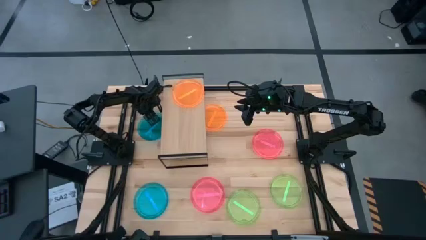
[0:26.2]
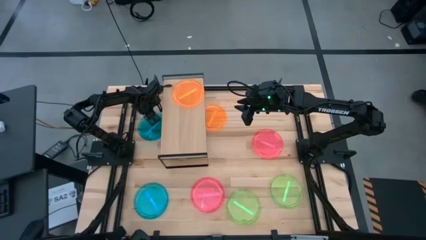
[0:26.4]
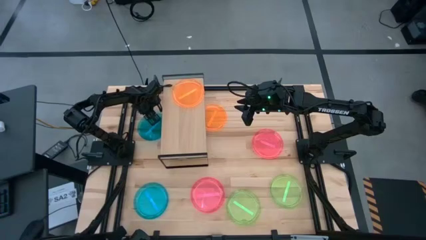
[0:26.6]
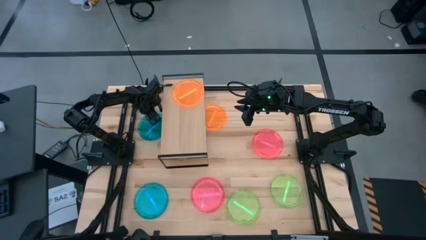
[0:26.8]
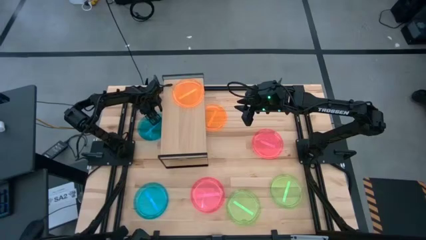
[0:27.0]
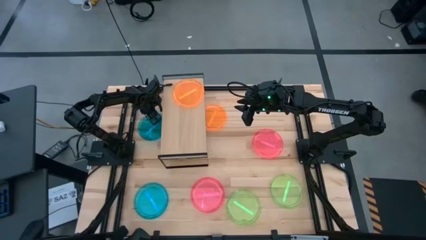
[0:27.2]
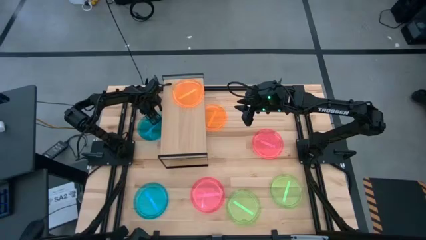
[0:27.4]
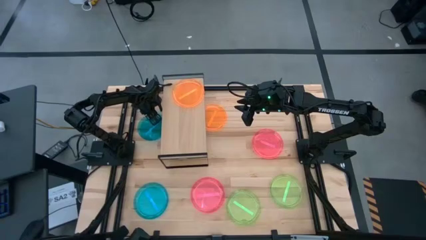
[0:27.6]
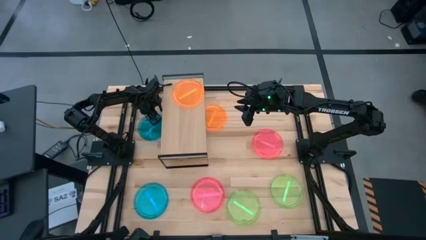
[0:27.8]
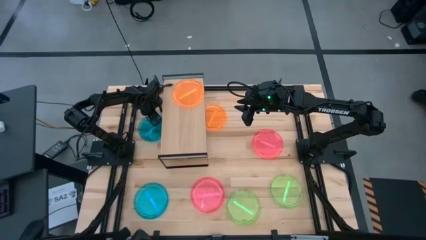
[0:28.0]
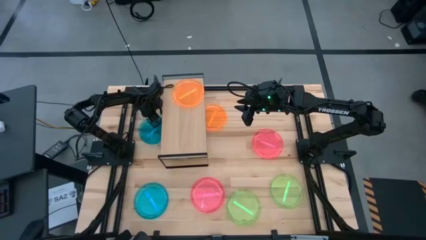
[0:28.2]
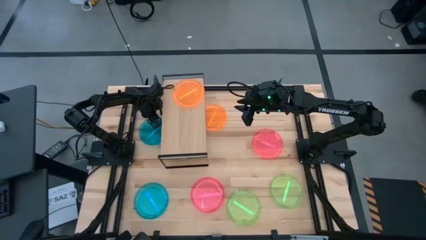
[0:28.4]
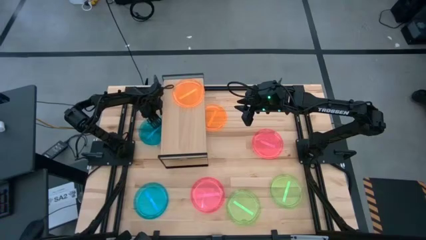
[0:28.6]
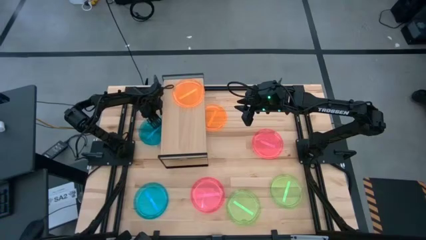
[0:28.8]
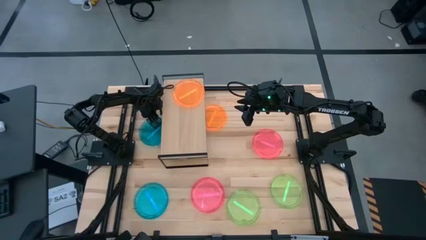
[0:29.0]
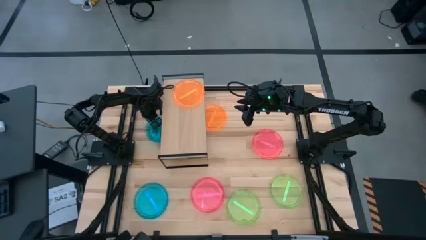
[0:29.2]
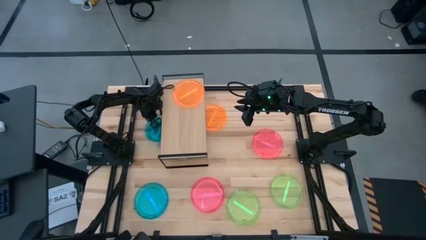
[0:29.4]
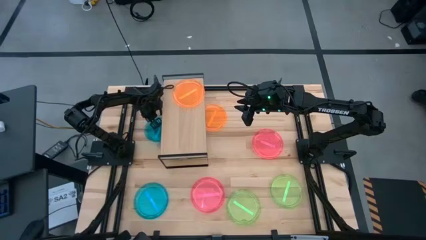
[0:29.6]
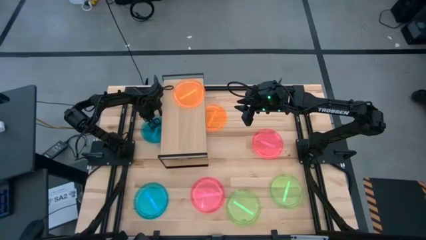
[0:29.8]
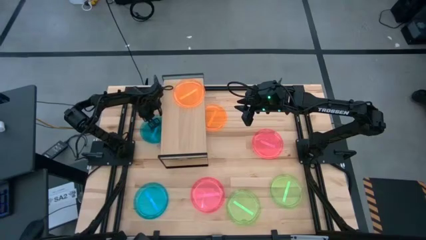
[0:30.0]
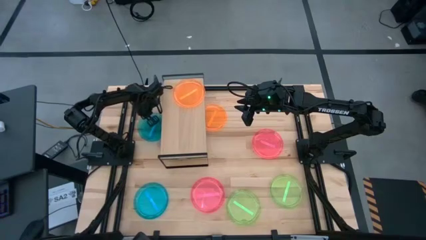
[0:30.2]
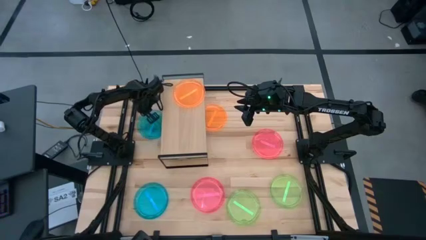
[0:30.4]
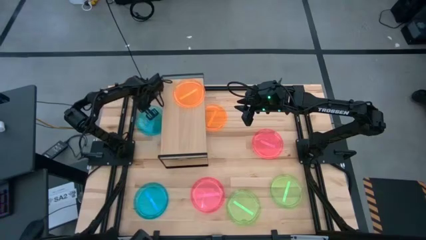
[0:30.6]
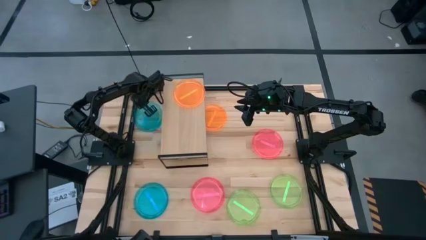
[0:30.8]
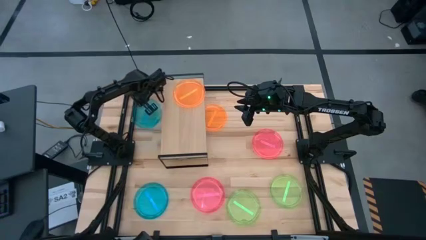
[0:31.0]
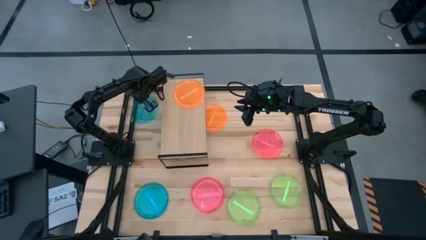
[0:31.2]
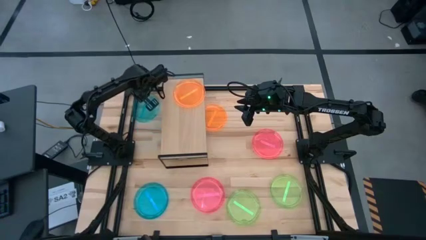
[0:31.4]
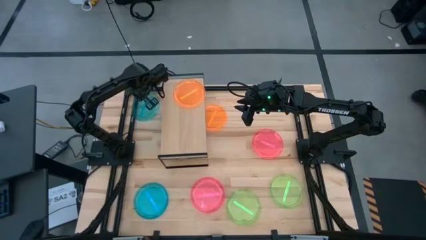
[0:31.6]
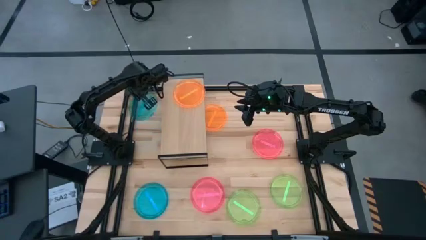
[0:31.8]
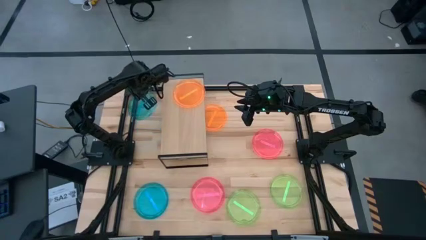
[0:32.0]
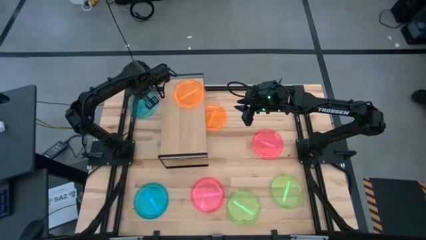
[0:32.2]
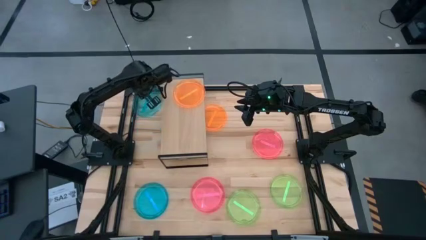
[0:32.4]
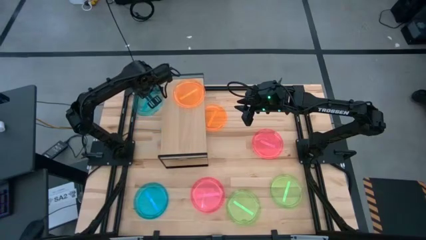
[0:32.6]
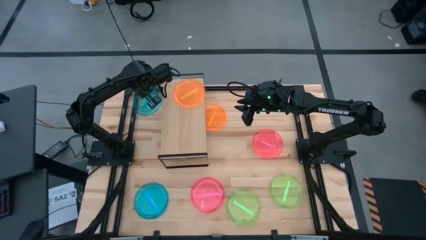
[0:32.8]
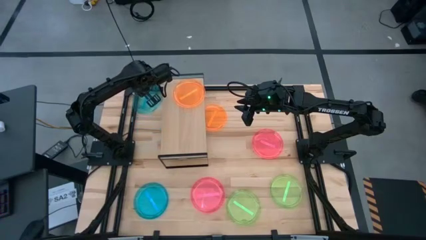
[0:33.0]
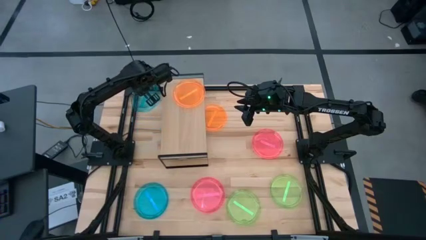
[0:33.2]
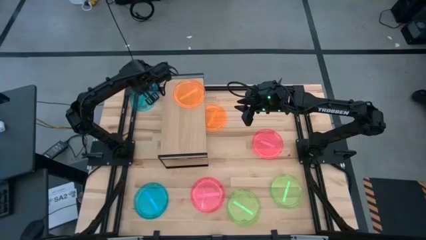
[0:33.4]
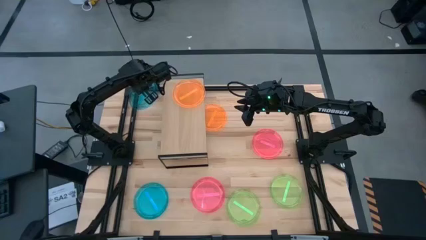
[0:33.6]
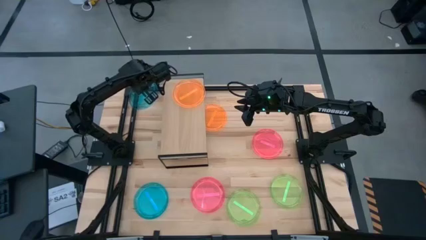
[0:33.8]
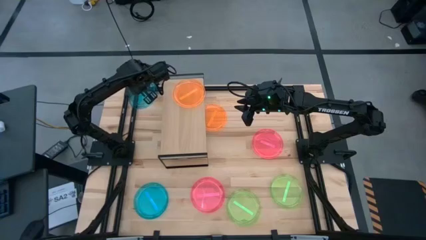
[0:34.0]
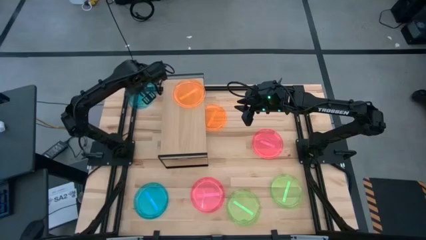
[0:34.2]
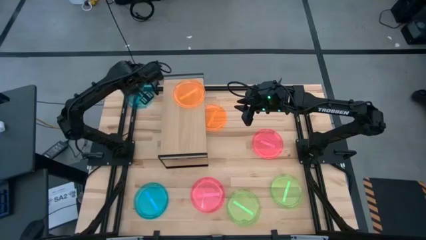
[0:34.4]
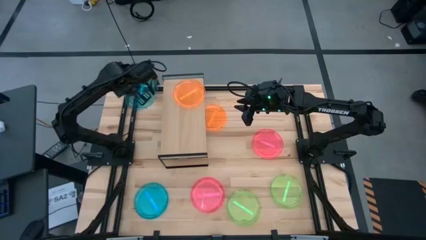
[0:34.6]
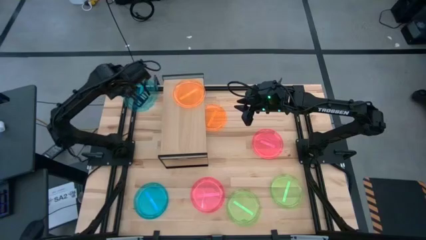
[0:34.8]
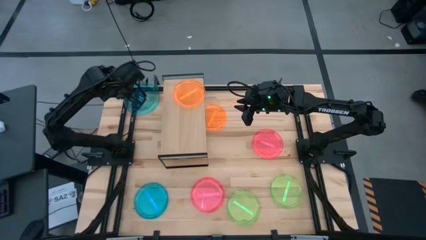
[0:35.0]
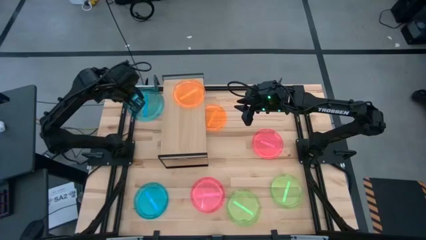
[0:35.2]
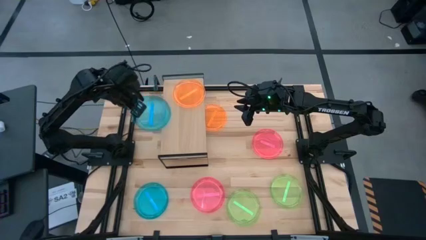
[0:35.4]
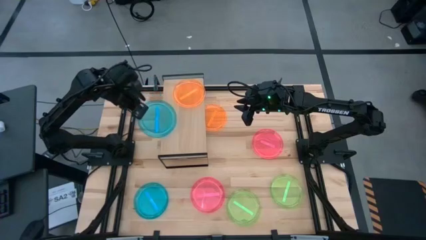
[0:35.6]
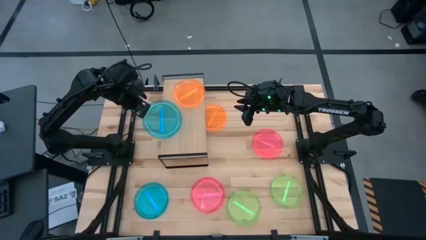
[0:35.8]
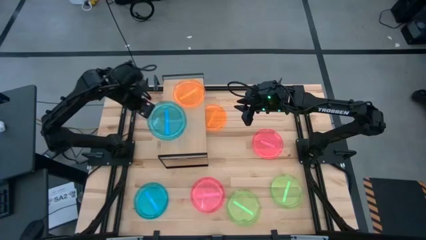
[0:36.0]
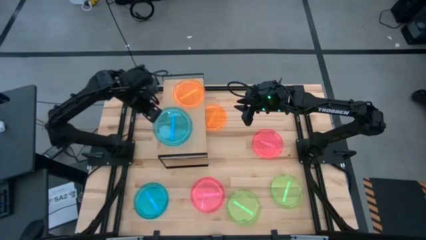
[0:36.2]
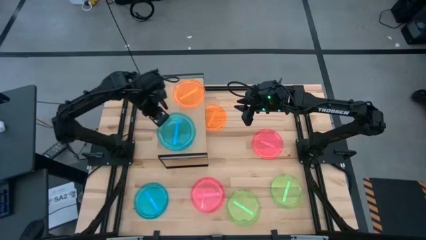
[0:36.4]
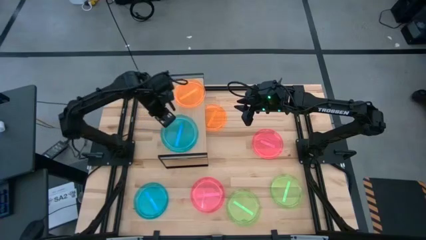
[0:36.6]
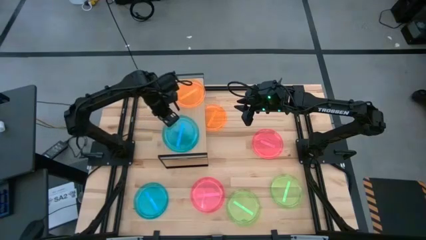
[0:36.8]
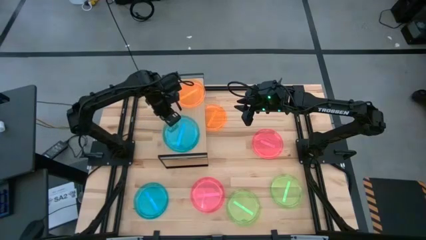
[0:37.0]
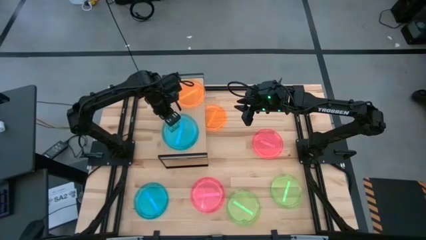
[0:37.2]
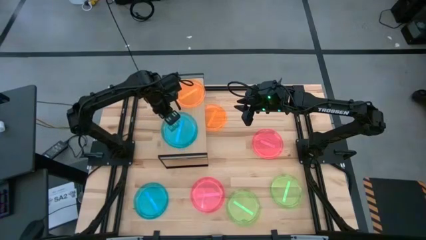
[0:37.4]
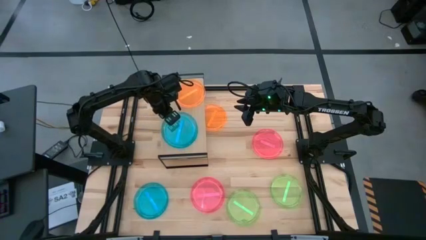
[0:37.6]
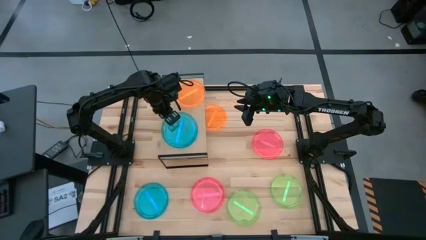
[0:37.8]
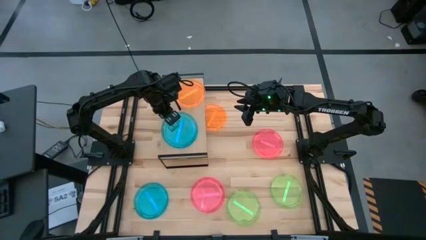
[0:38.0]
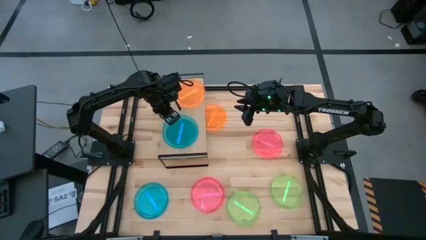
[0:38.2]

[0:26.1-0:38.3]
Task: Place and stack plates onto a shelf
Put the top blue plate on the shelf
